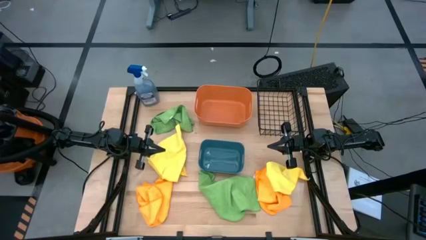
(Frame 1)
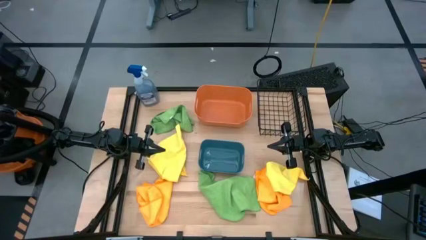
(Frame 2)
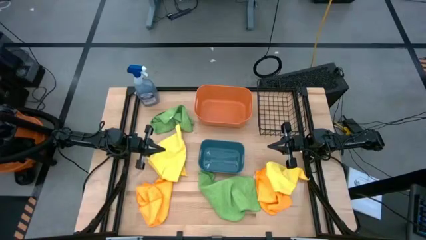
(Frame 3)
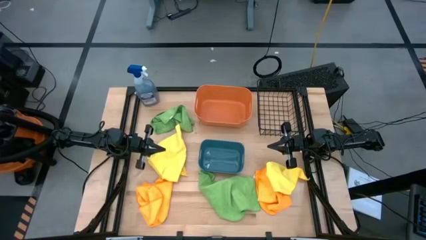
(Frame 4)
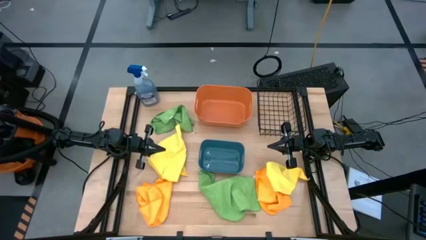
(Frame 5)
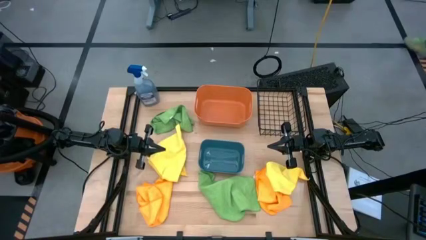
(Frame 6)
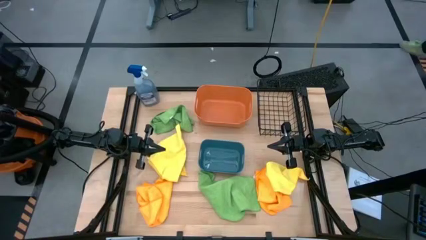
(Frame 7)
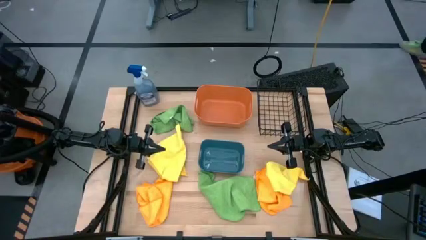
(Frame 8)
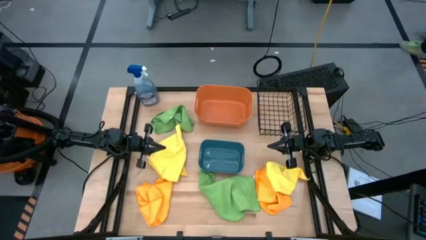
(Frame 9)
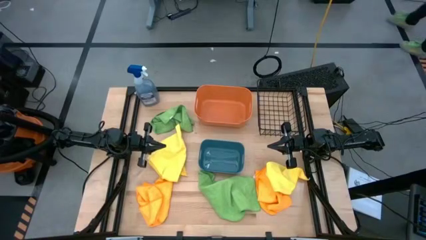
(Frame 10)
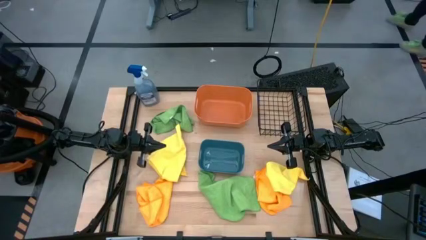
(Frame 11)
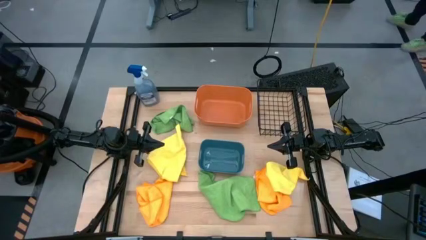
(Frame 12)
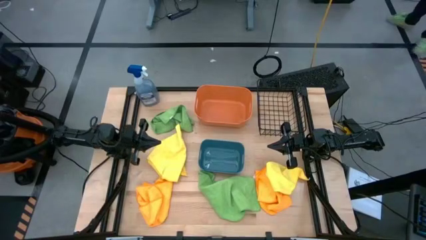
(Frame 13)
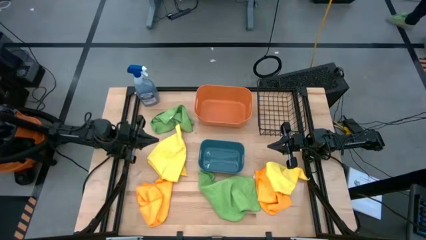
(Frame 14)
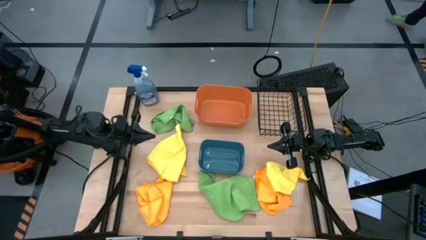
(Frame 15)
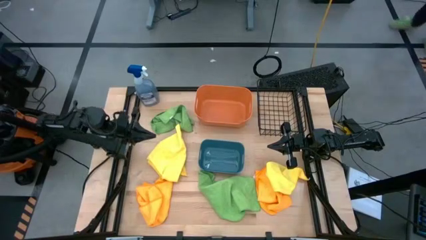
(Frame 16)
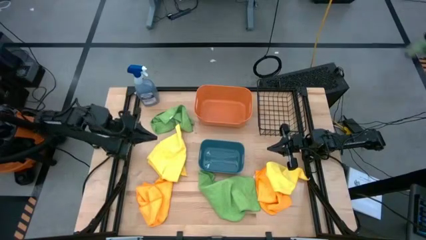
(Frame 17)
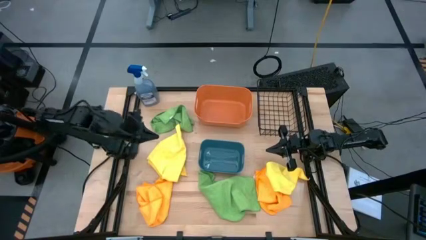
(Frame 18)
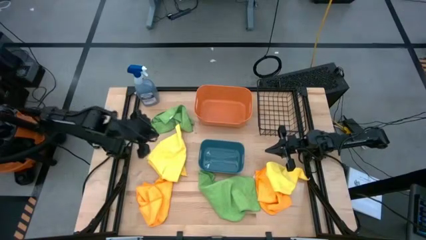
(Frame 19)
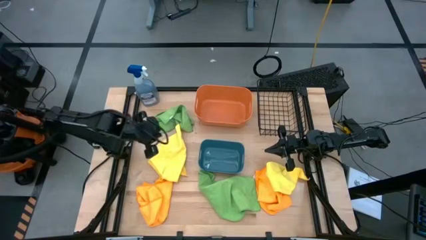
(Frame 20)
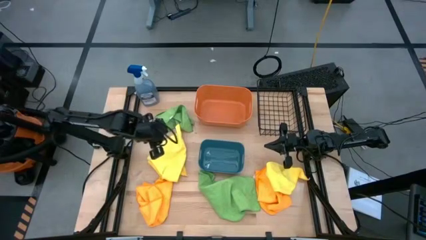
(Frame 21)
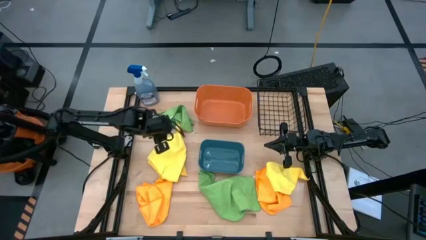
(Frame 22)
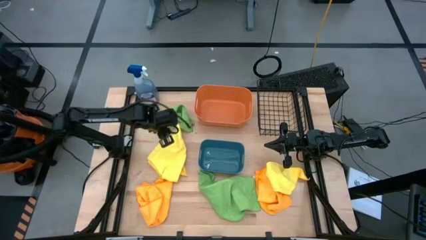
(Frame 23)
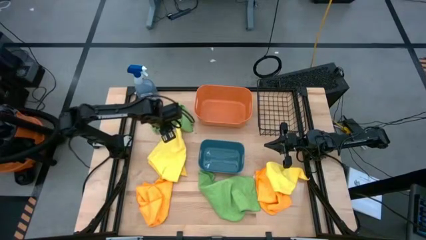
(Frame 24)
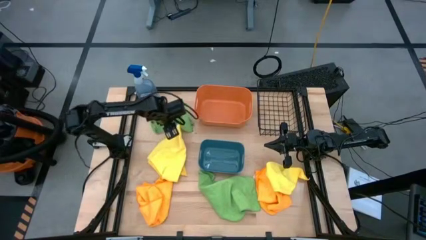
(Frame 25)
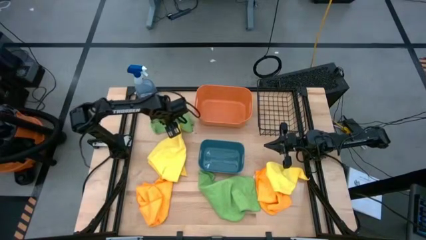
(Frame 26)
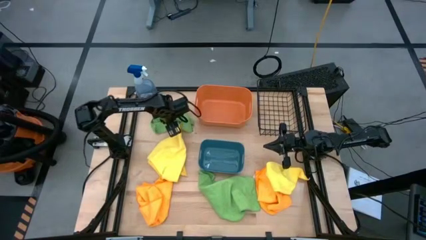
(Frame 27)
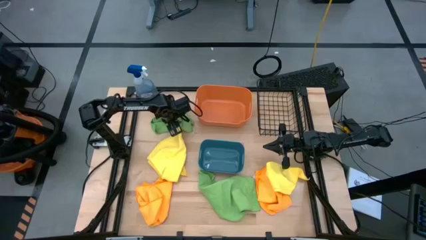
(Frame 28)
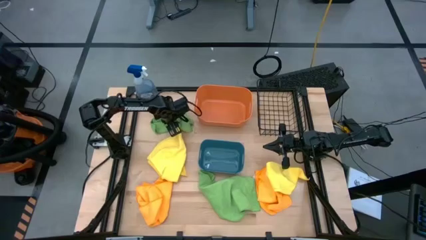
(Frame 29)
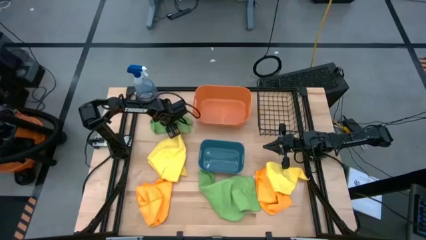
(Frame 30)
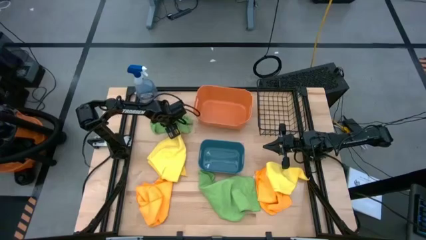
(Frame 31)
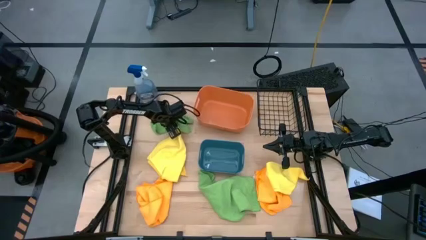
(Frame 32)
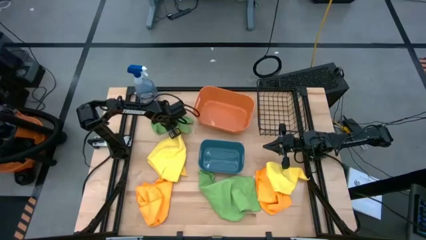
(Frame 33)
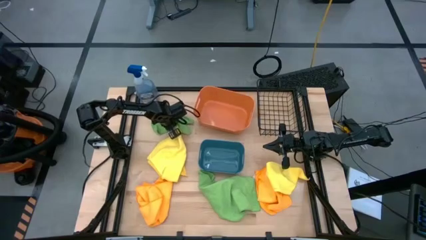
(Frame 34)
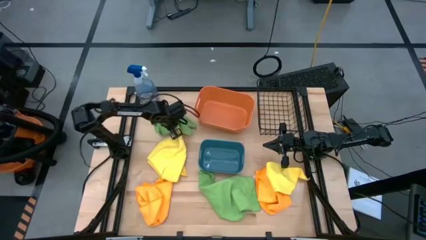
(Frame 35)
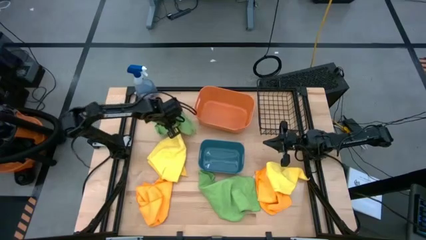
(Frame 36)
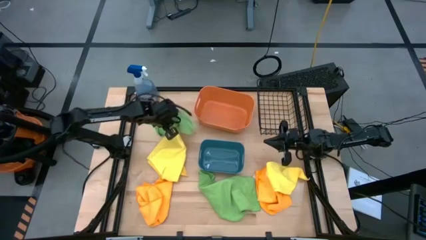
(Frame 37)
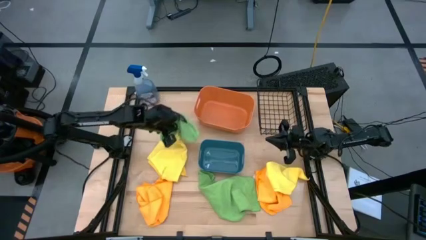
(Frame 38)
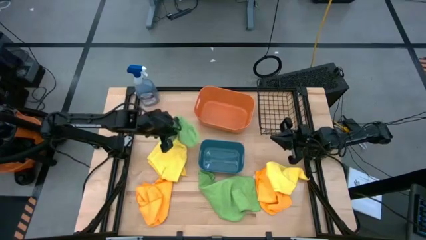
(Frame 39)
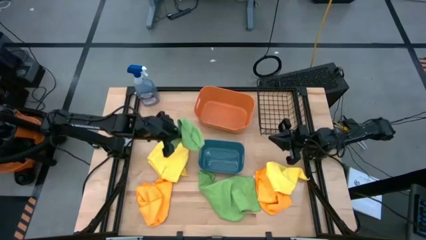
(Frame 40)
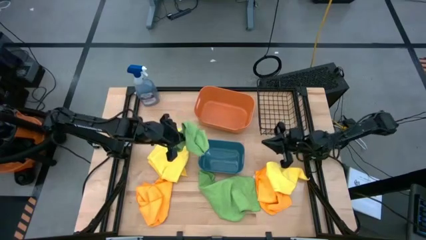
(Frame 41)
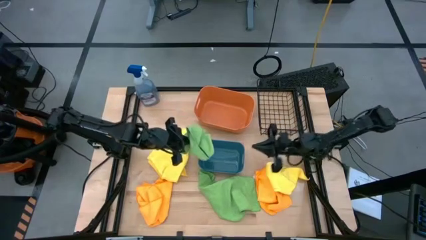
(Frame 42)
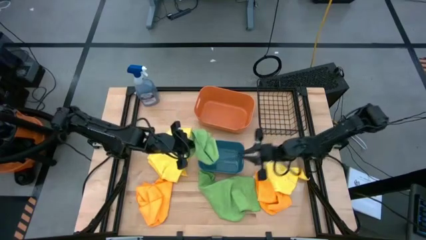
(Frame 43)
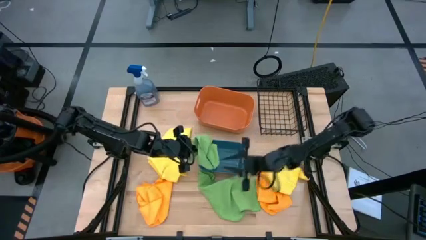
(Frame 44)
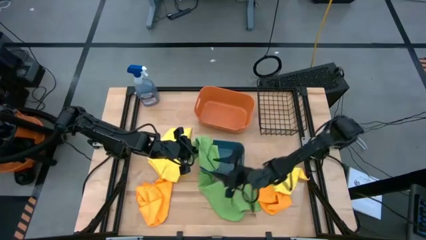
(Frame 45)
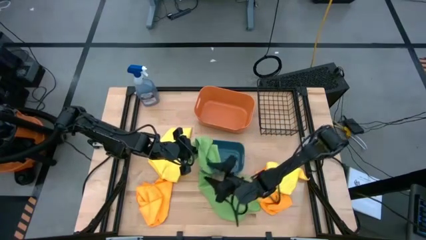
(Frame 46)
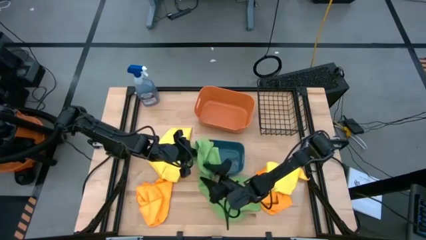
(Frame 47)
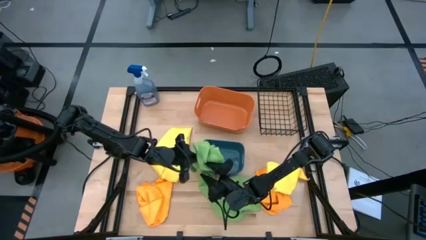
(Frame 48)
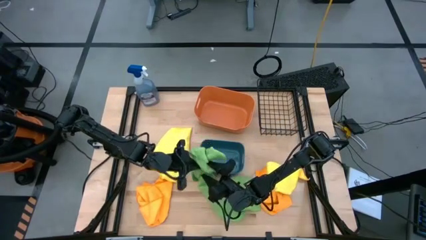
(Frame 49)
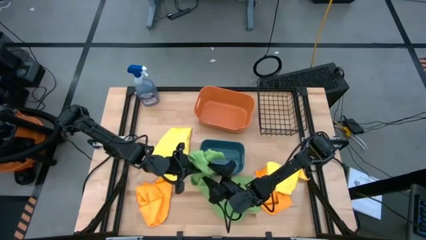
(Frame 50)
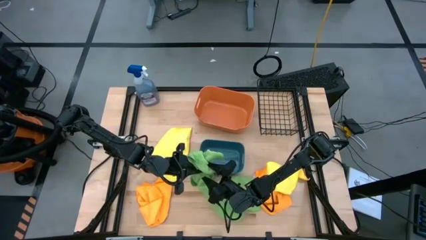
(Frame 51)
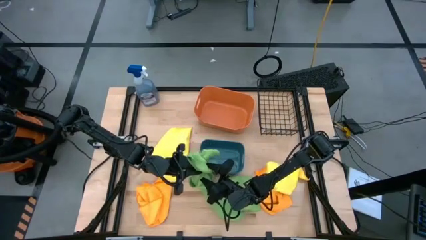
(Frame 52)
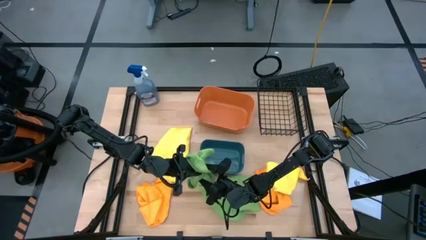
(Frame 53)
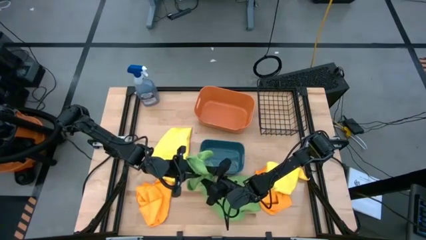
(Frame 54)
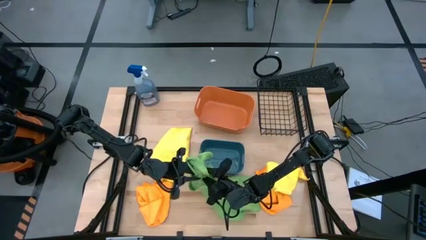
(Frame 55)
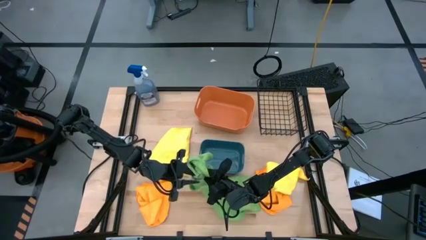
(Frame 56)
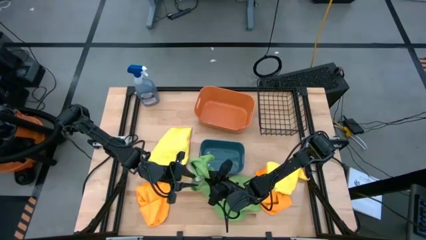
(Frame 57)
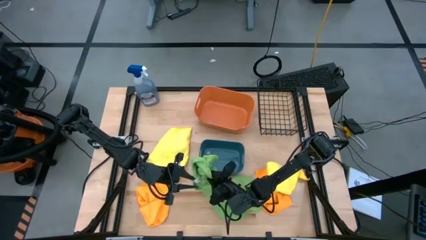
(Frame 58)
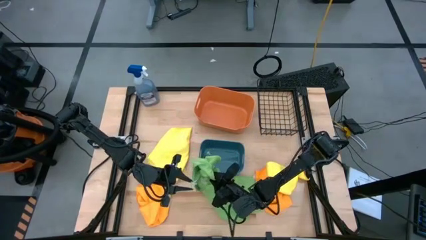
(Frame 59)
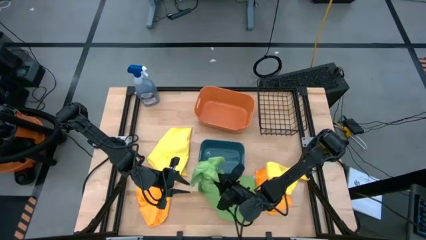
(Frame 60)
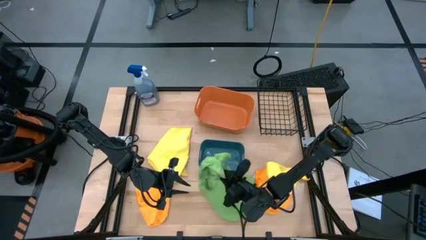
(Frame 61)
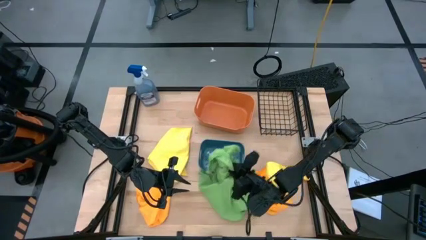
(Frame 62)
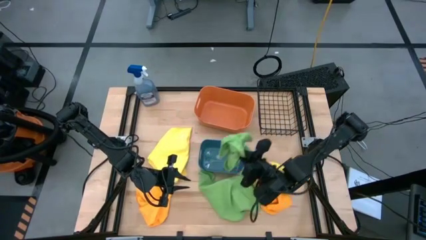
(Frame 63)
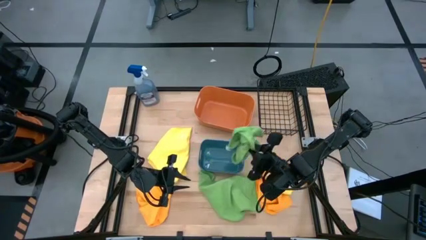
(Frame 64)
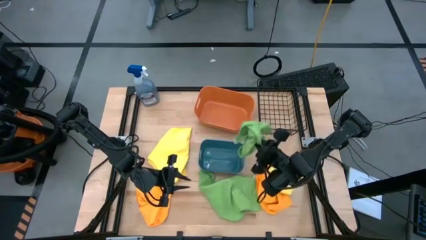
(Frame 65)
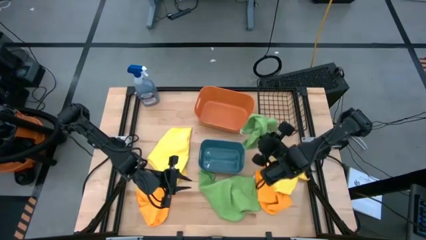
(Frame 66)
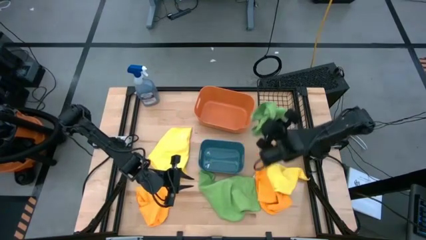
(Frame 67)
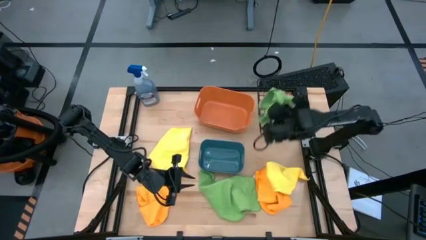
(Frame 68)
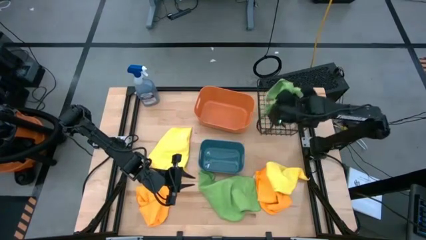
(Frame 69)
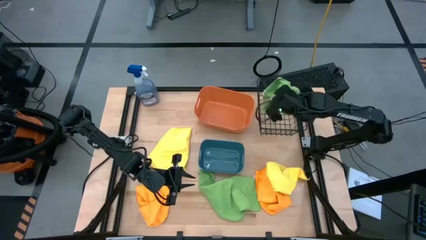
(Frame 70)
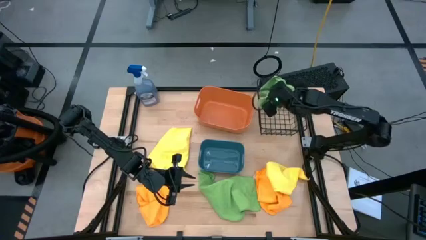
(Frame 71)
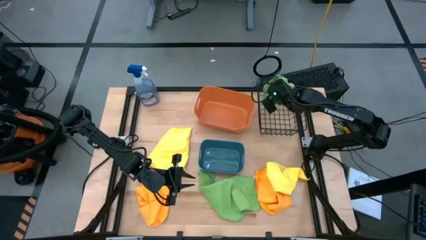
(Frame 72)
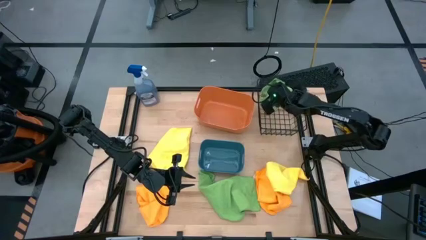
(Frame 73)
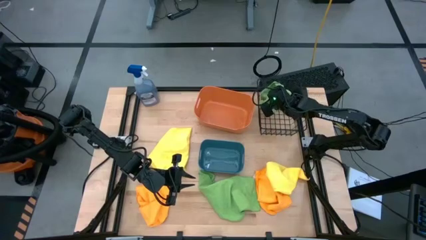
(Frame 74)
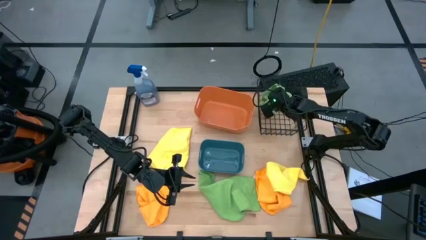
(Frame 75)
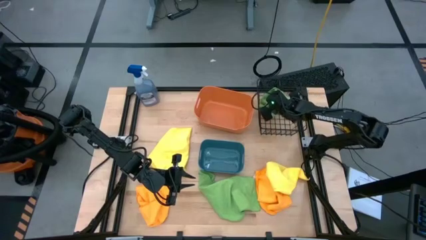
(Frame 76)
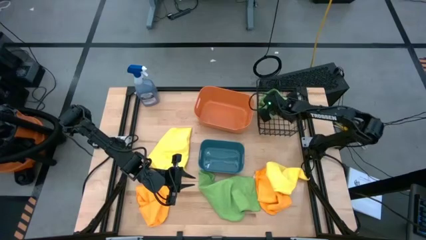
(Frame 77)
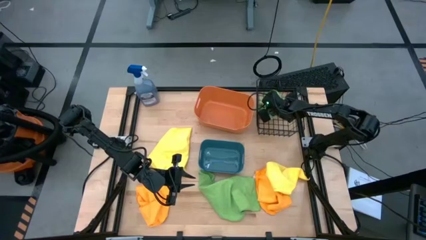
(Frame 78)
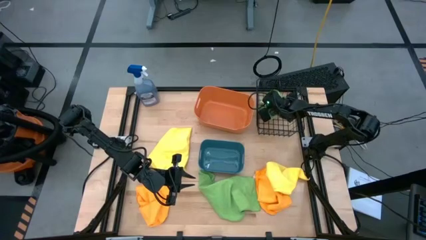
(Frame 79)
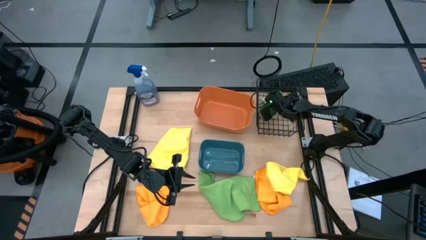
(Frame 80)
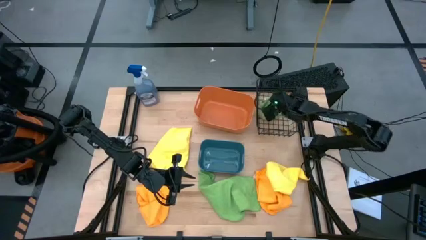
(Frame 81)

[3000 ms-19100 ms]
Task: Sort microfiber towel by color & place in baskets
Put the top green microfiber towel into the wire basket
